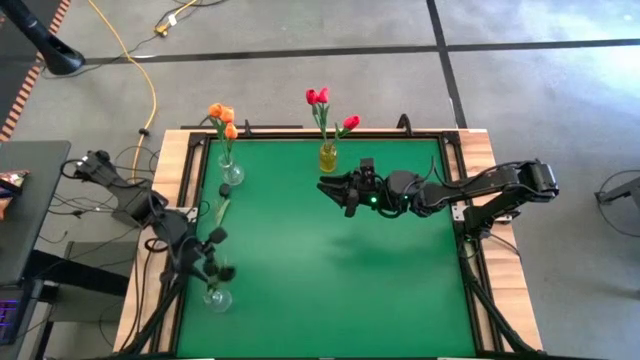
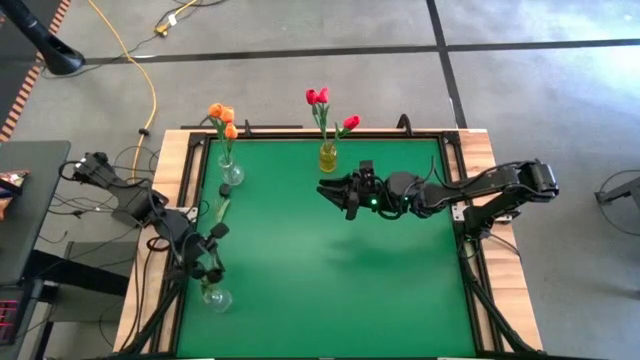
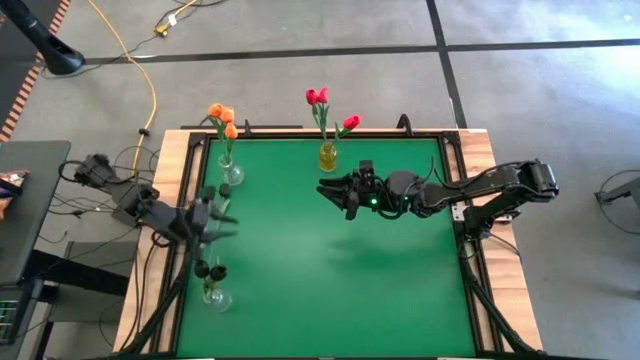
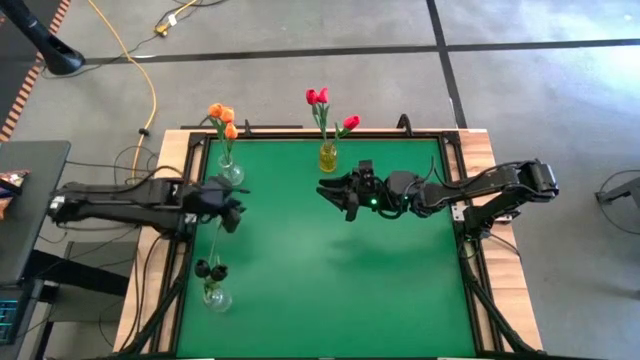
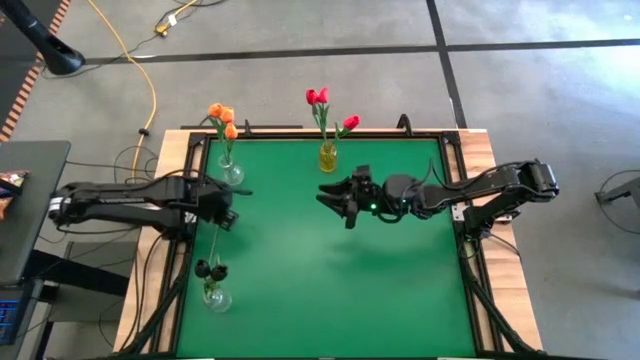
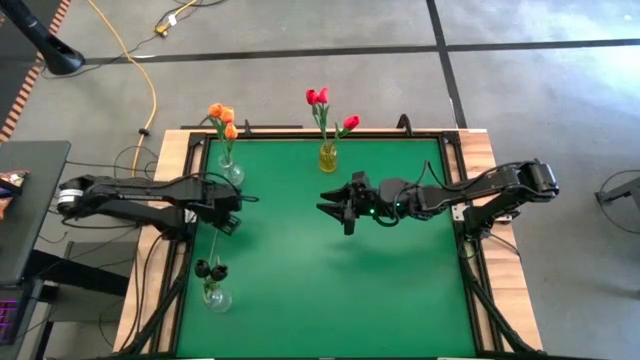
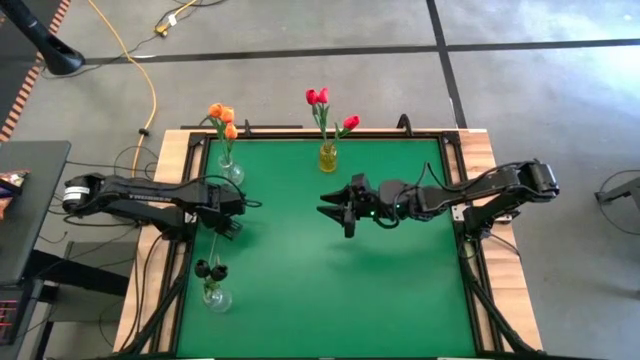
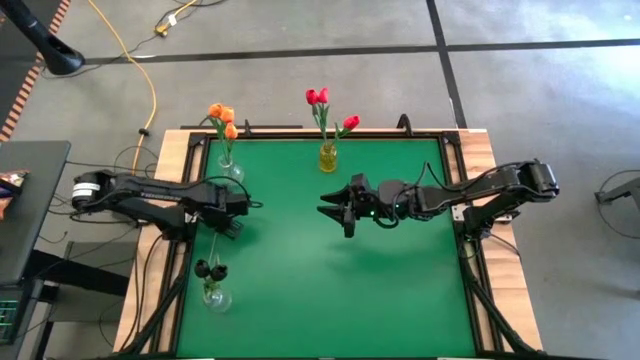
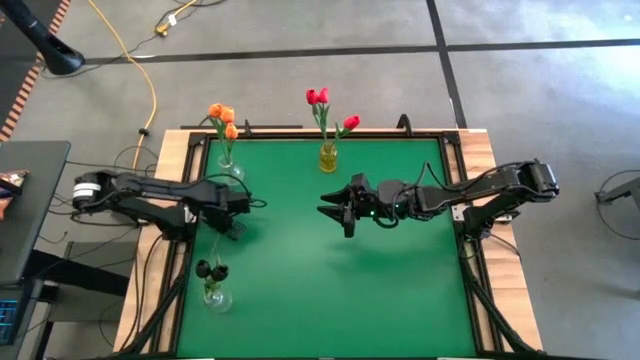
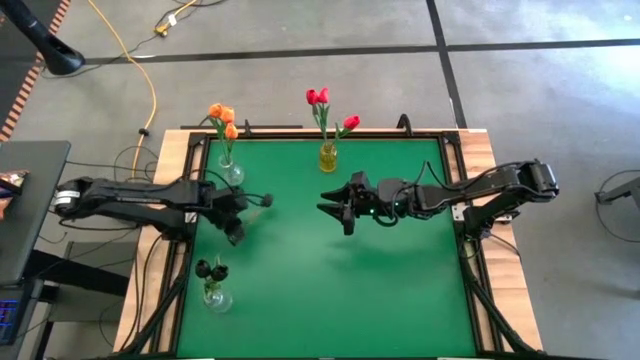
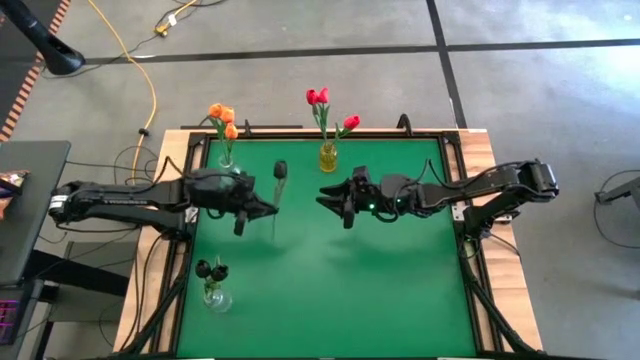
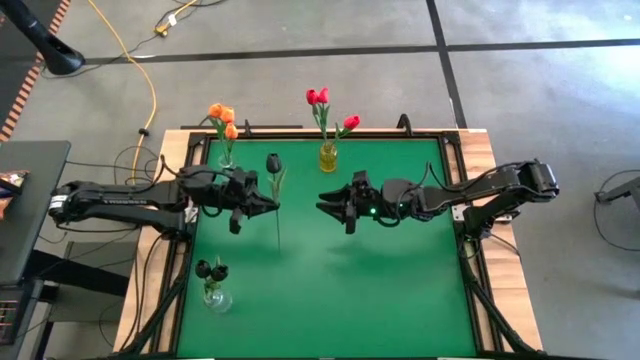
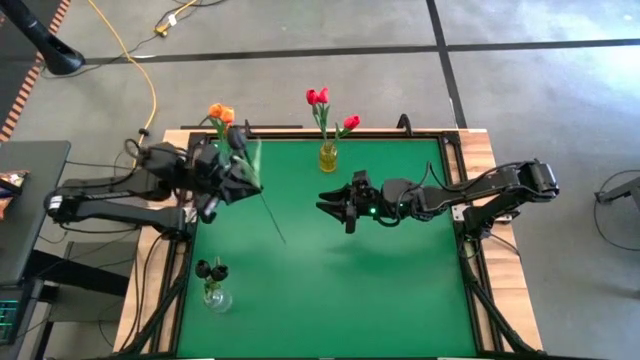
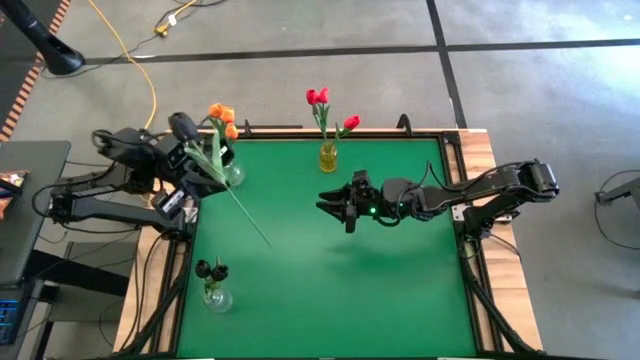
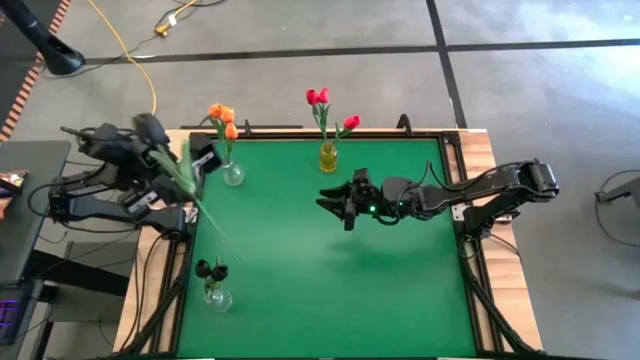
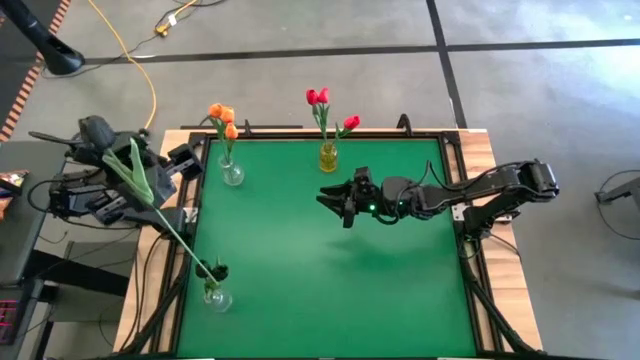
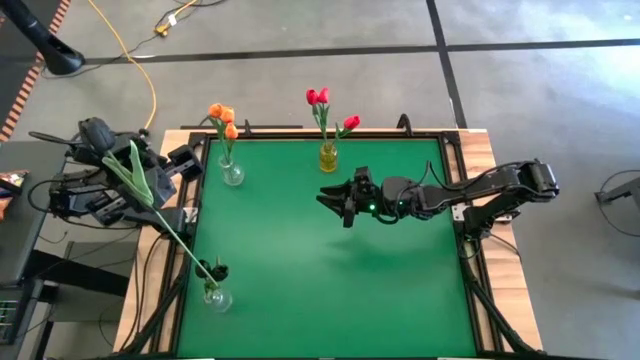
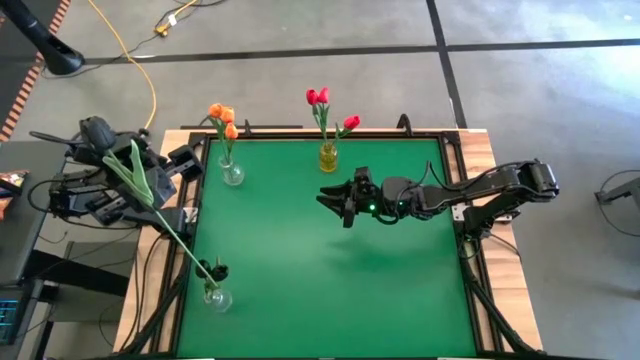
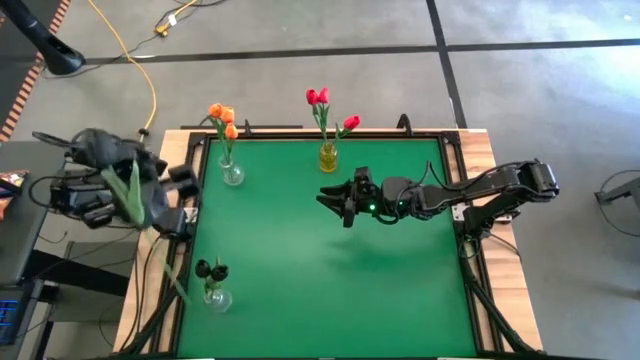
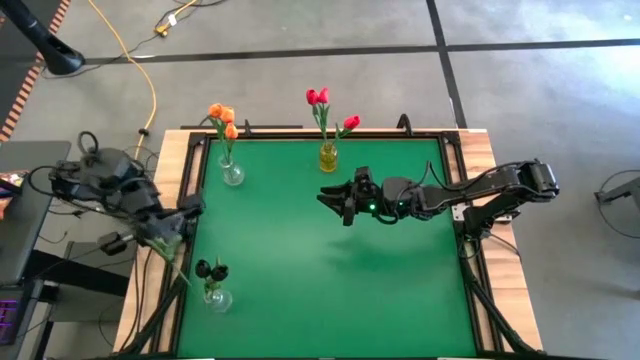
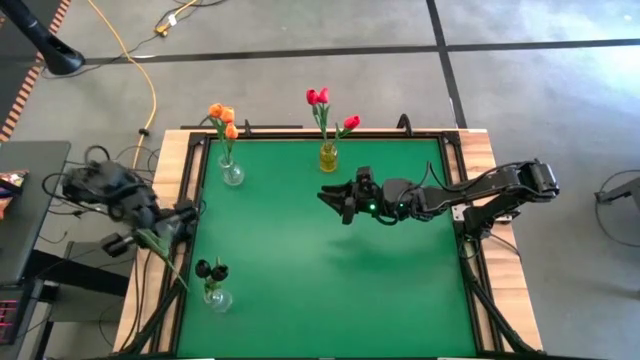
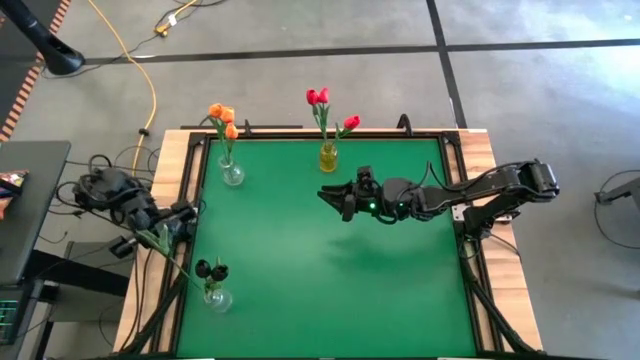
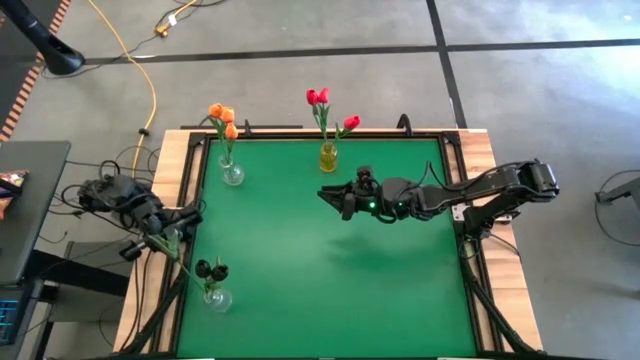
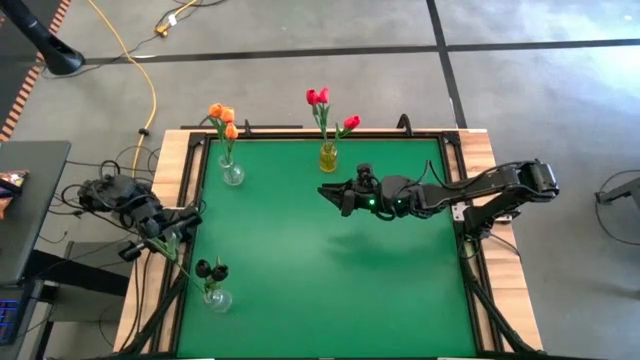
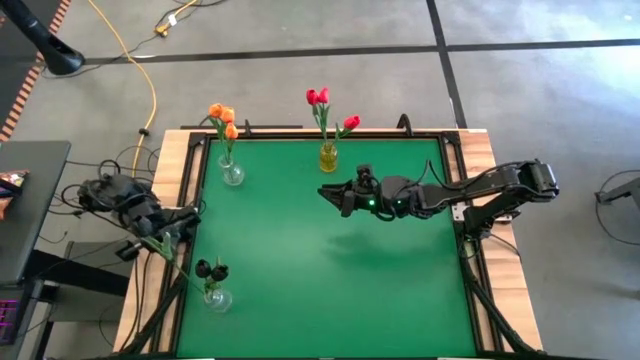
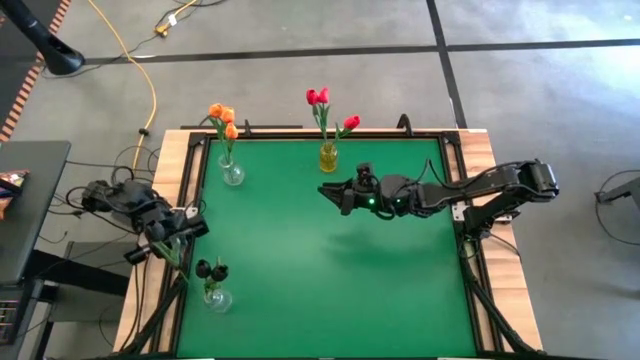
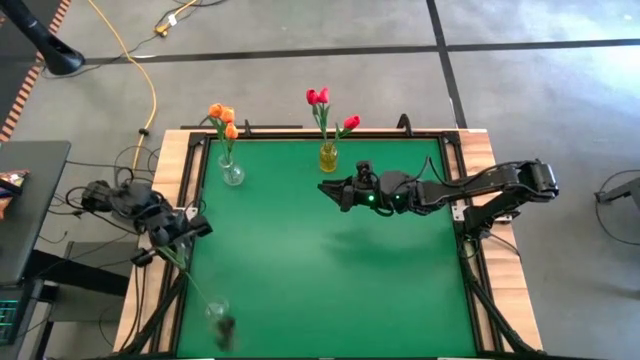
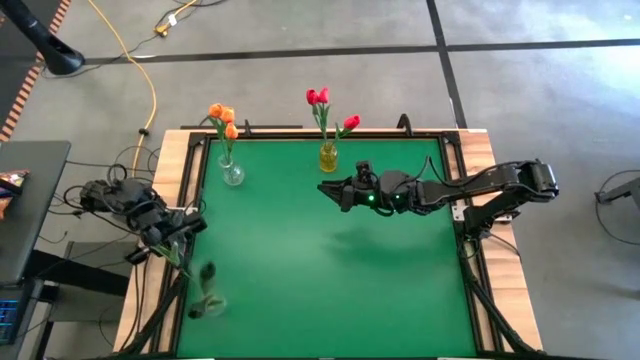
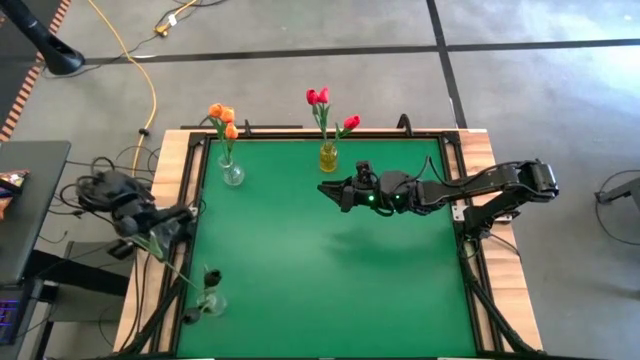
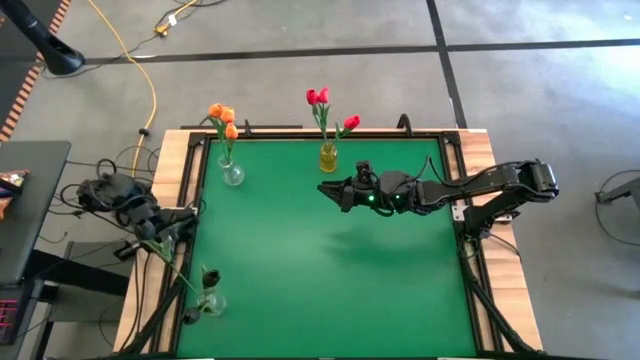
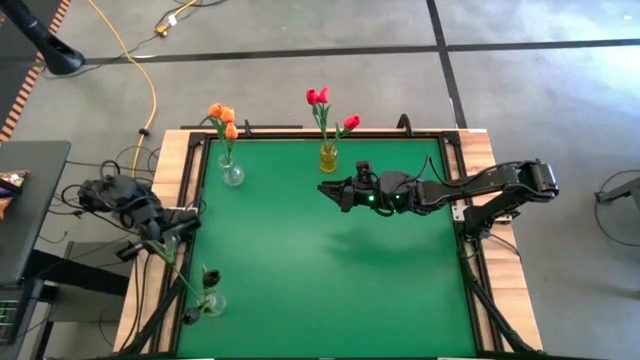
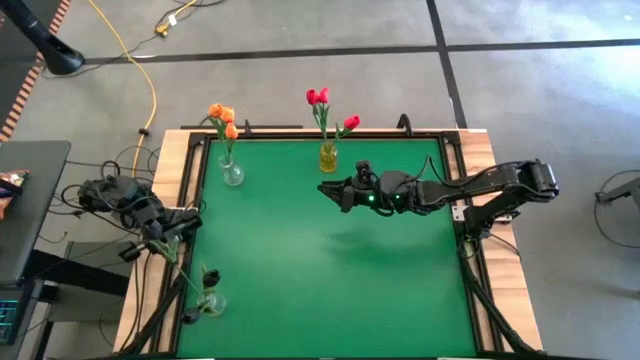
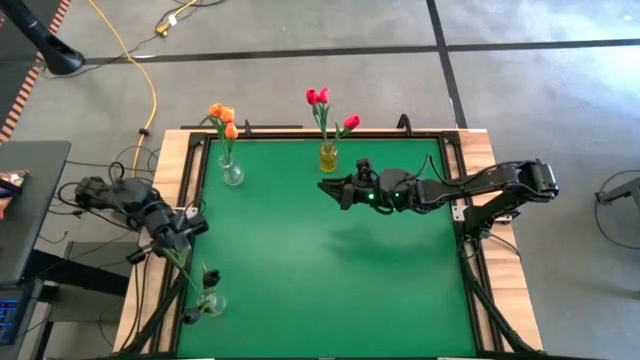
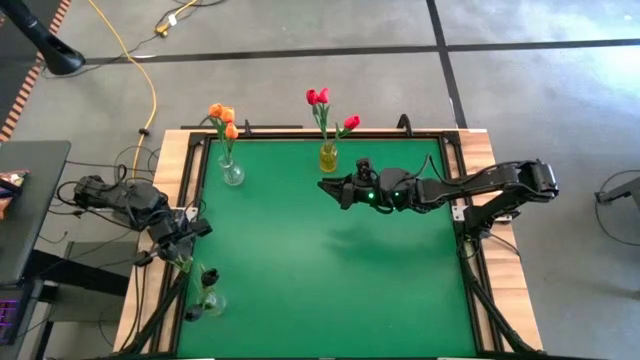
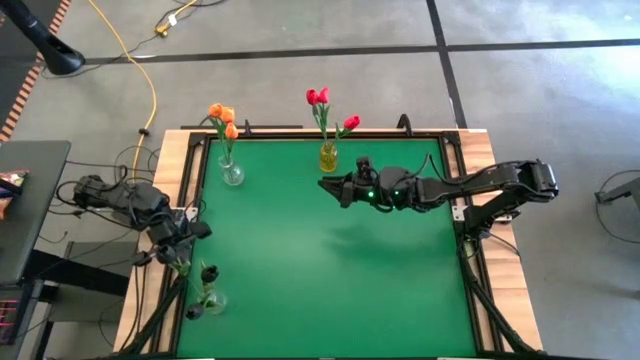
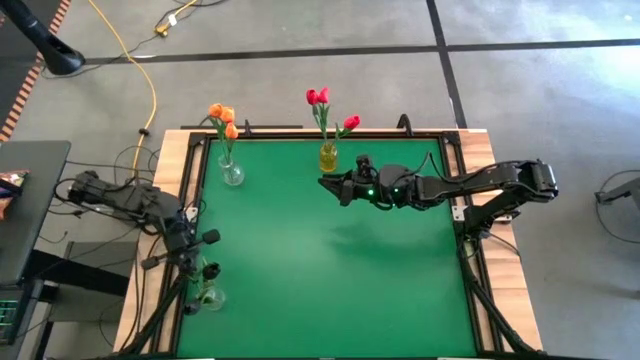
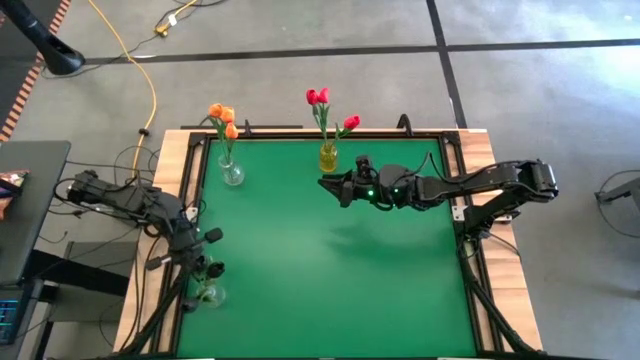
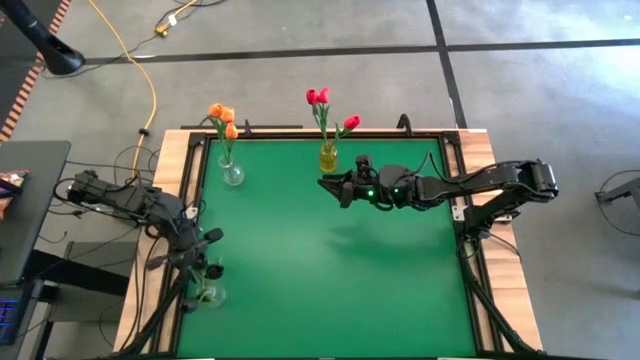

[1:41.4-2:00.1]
Task: Sort flowers into vase by color
Put the black flower into the bottom transparent vase
